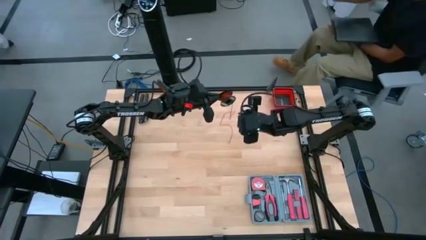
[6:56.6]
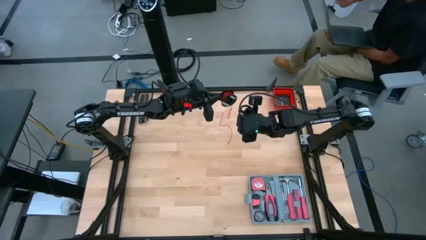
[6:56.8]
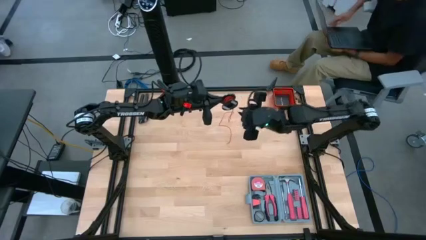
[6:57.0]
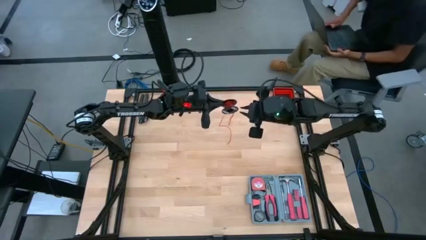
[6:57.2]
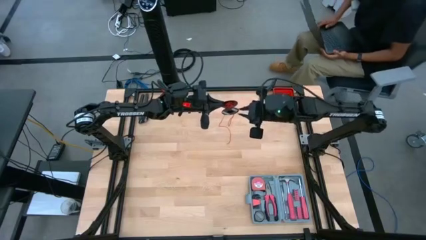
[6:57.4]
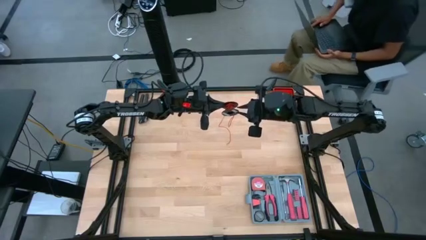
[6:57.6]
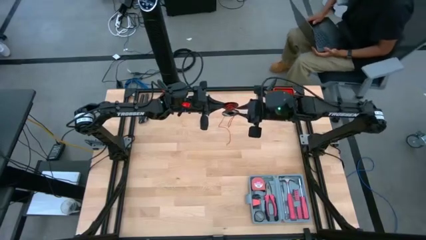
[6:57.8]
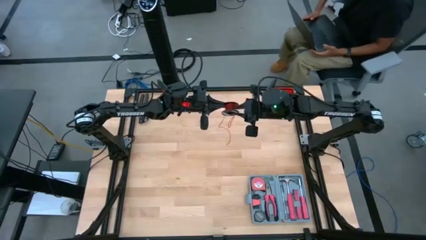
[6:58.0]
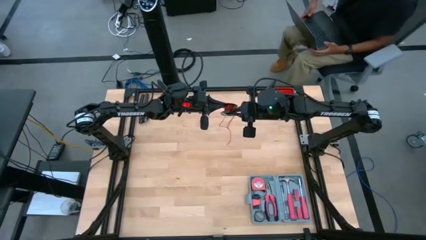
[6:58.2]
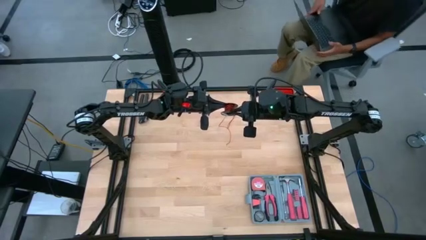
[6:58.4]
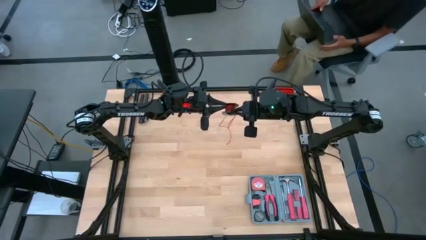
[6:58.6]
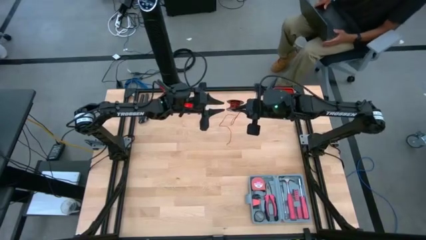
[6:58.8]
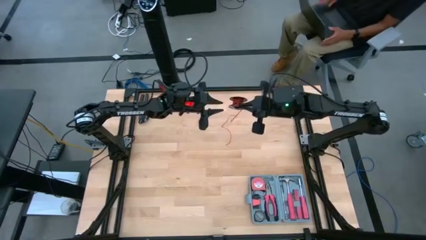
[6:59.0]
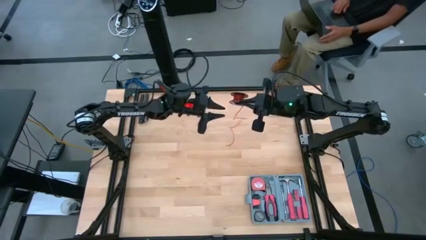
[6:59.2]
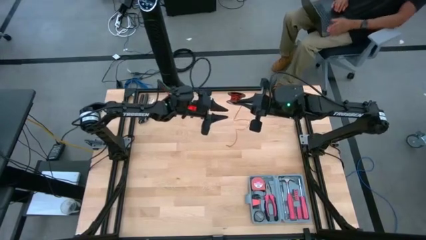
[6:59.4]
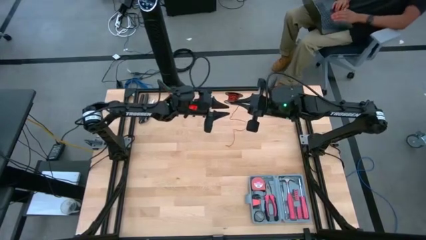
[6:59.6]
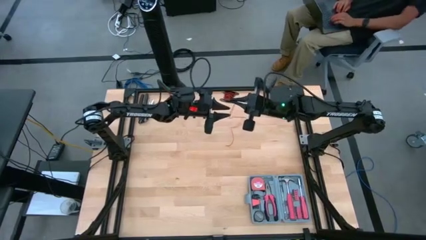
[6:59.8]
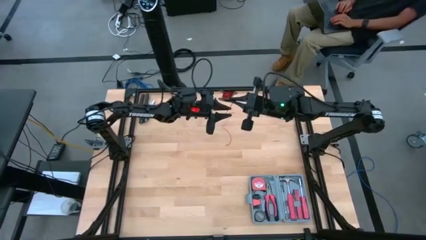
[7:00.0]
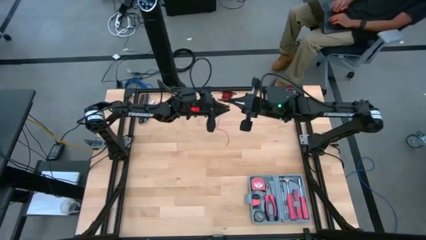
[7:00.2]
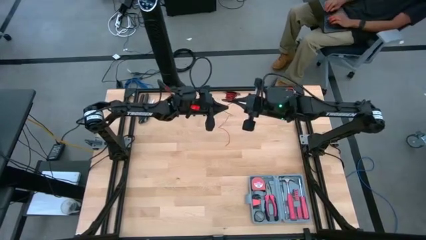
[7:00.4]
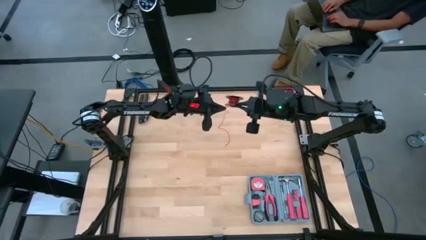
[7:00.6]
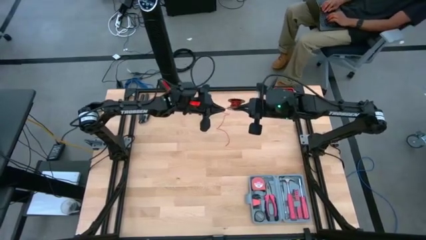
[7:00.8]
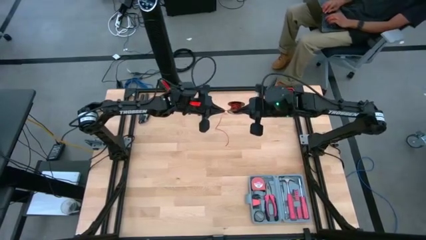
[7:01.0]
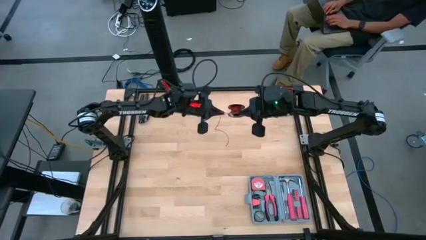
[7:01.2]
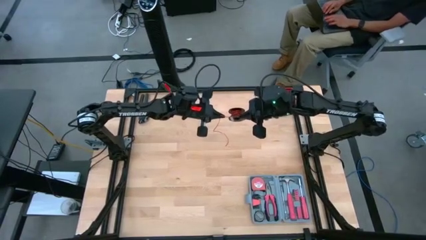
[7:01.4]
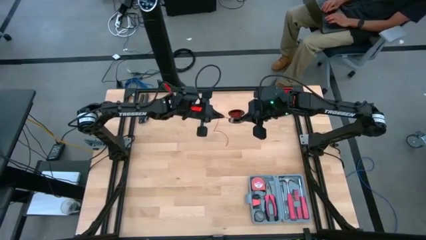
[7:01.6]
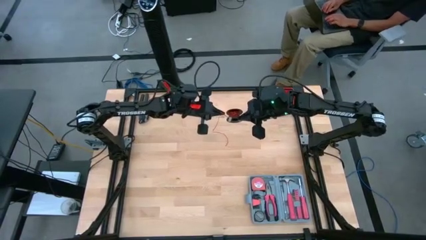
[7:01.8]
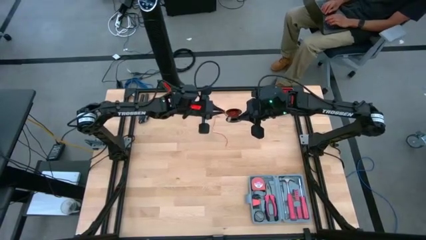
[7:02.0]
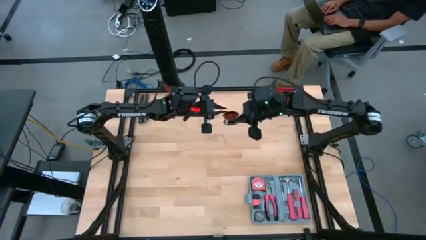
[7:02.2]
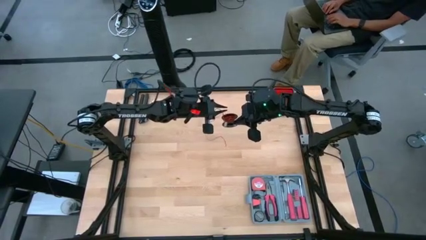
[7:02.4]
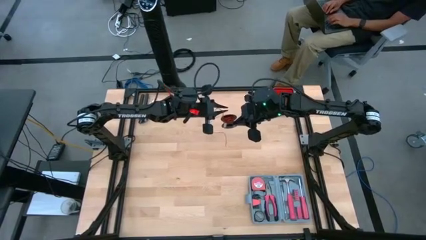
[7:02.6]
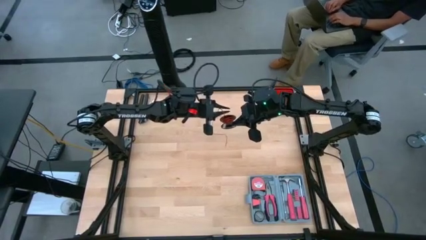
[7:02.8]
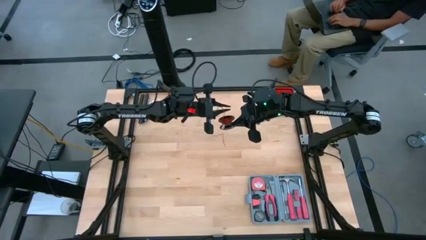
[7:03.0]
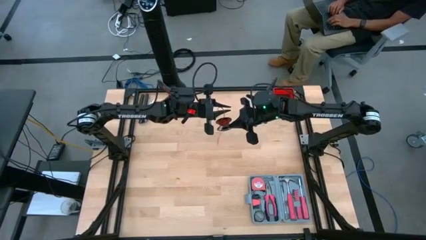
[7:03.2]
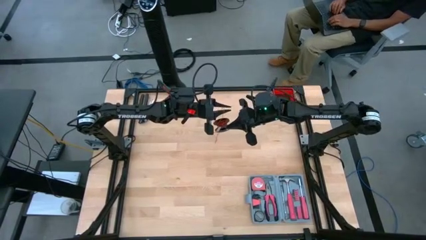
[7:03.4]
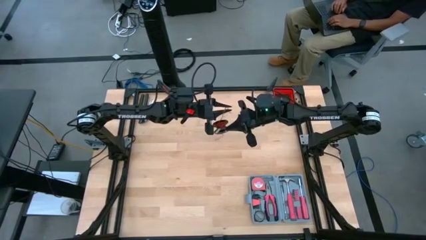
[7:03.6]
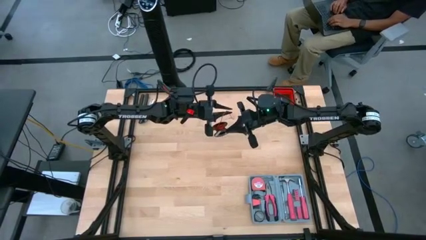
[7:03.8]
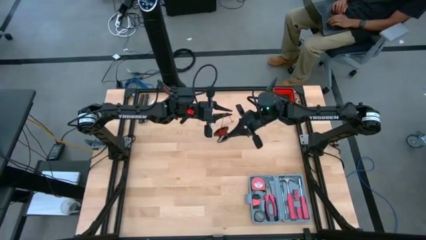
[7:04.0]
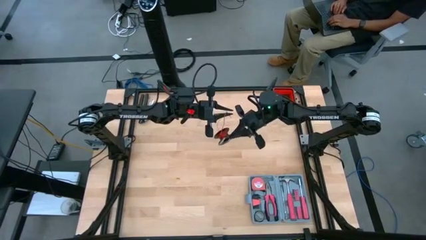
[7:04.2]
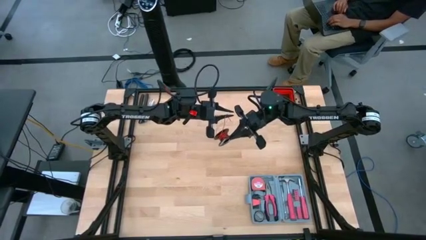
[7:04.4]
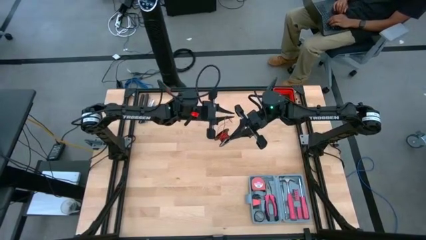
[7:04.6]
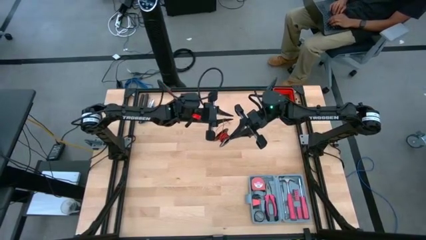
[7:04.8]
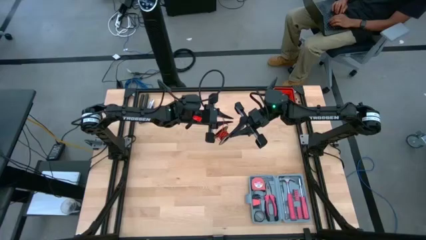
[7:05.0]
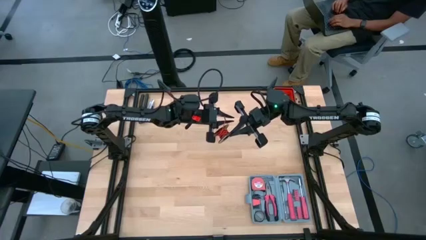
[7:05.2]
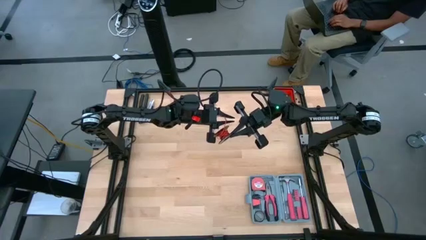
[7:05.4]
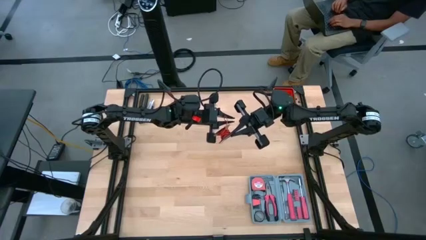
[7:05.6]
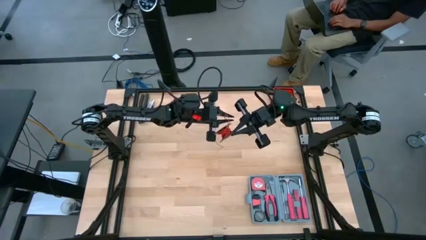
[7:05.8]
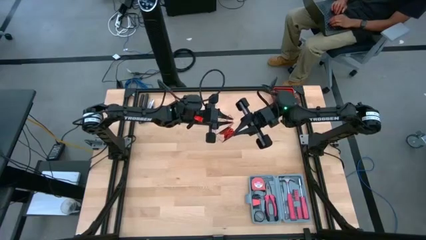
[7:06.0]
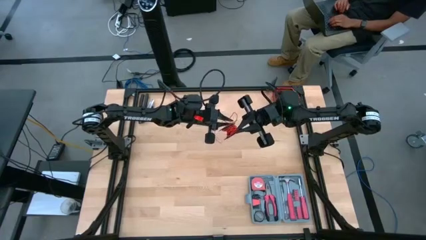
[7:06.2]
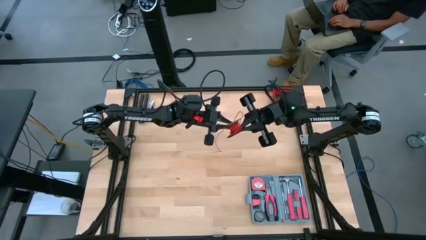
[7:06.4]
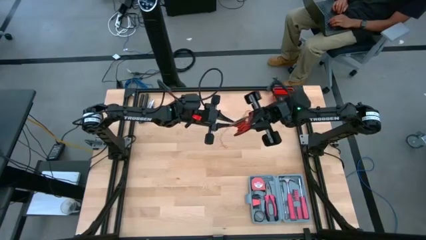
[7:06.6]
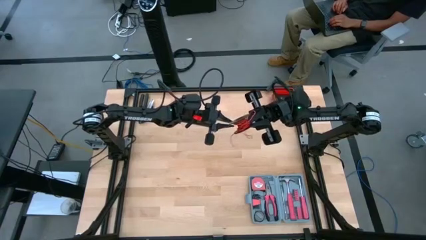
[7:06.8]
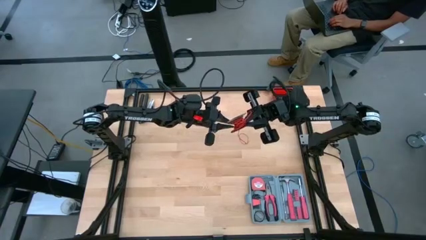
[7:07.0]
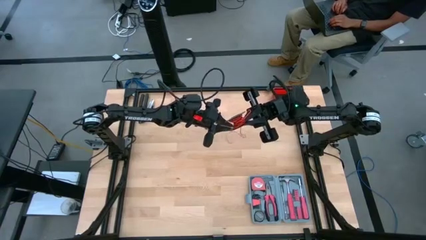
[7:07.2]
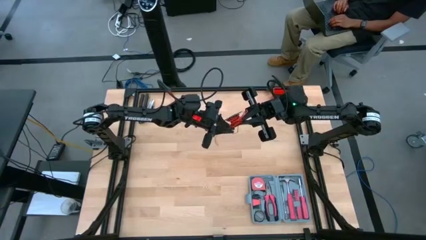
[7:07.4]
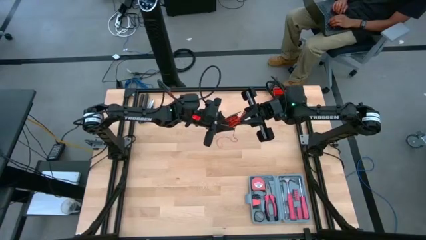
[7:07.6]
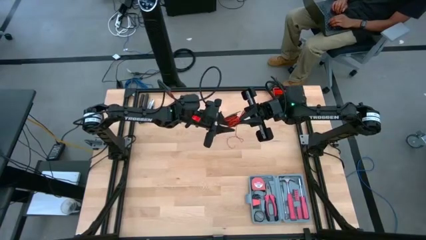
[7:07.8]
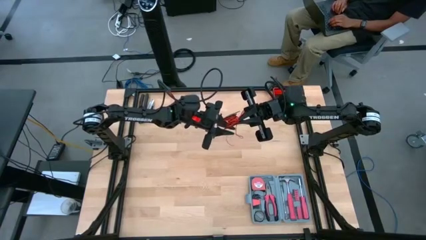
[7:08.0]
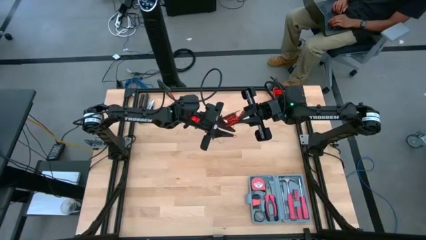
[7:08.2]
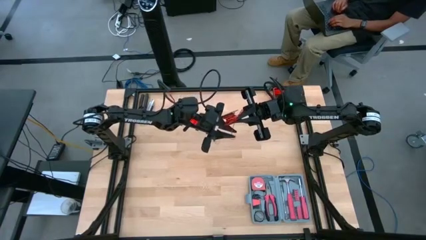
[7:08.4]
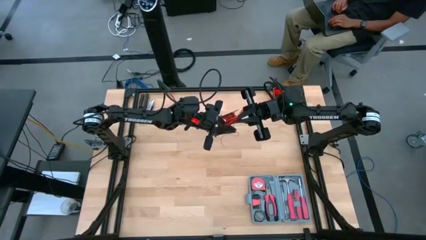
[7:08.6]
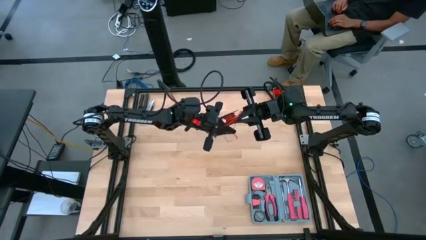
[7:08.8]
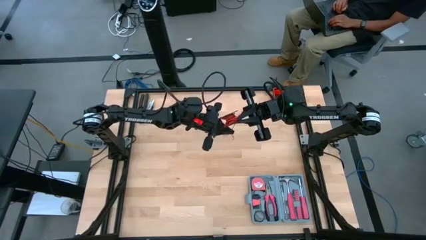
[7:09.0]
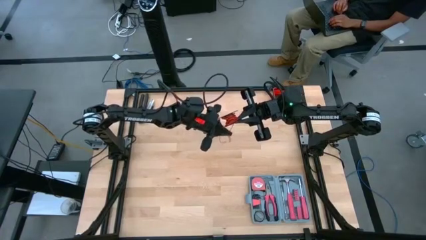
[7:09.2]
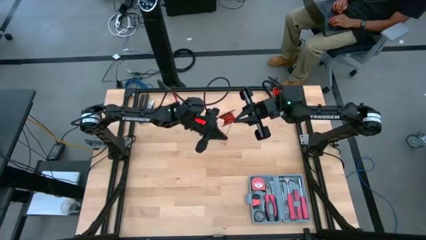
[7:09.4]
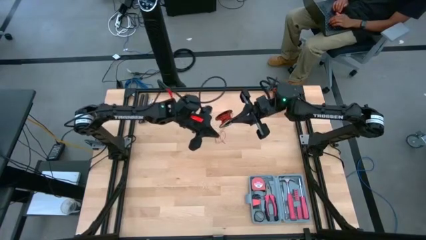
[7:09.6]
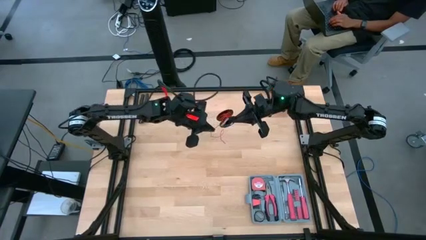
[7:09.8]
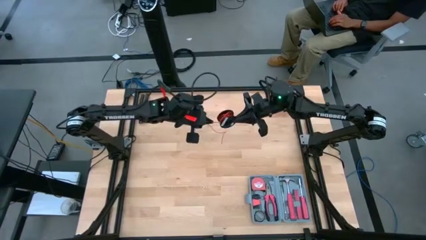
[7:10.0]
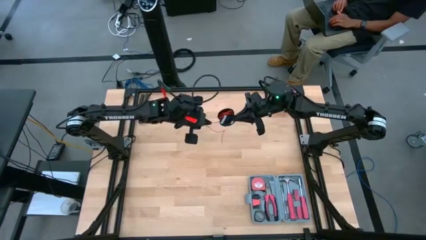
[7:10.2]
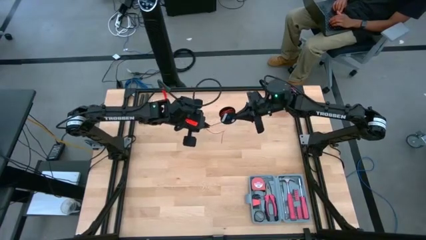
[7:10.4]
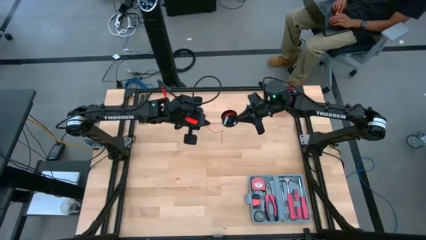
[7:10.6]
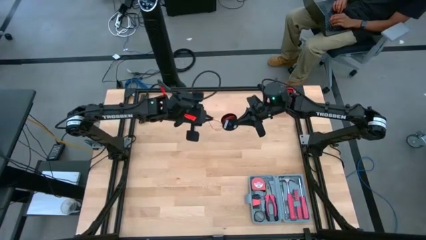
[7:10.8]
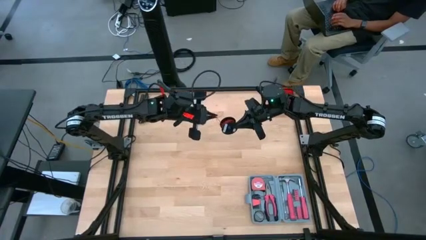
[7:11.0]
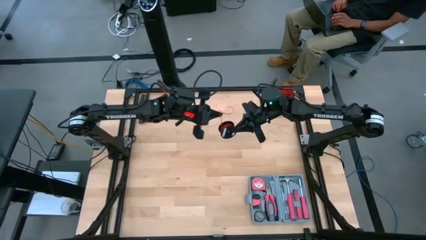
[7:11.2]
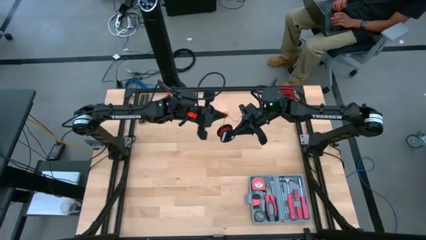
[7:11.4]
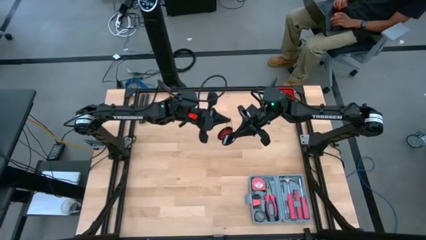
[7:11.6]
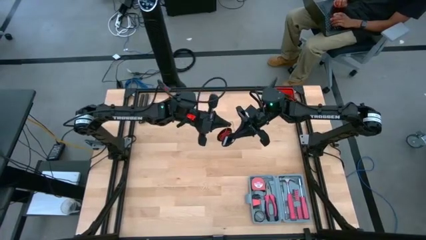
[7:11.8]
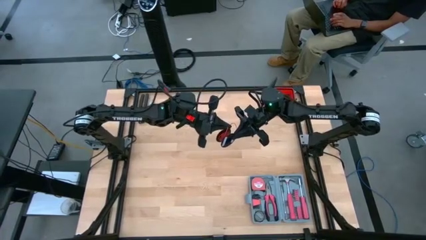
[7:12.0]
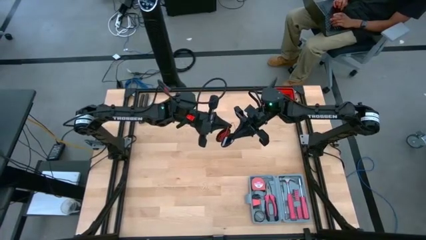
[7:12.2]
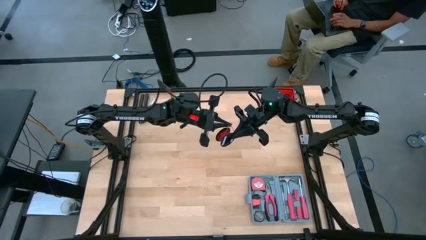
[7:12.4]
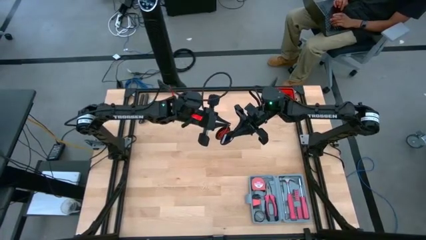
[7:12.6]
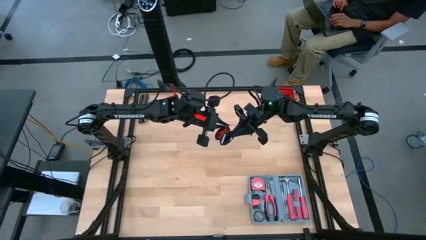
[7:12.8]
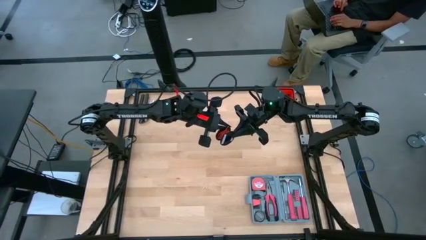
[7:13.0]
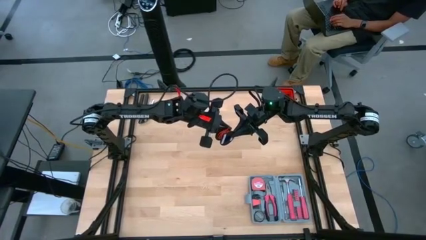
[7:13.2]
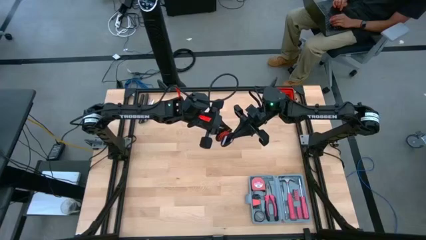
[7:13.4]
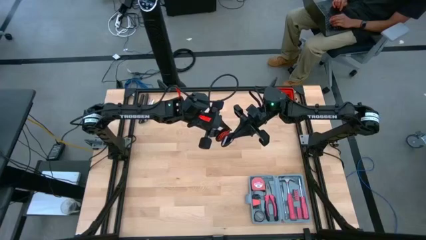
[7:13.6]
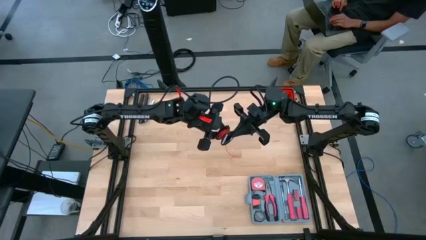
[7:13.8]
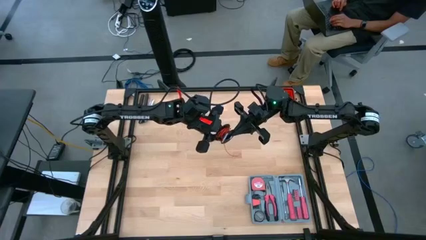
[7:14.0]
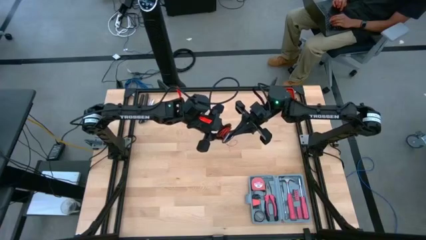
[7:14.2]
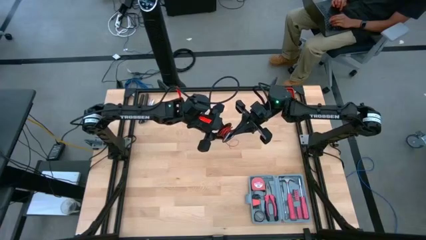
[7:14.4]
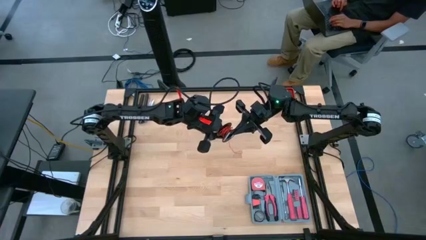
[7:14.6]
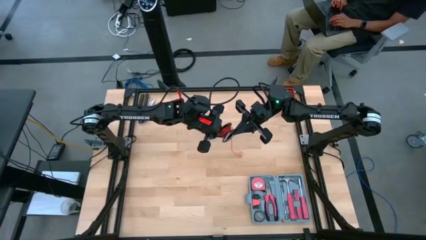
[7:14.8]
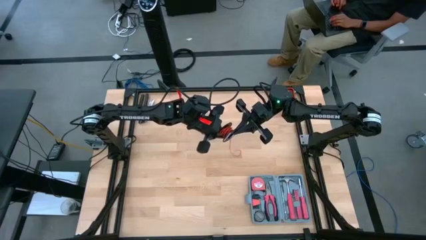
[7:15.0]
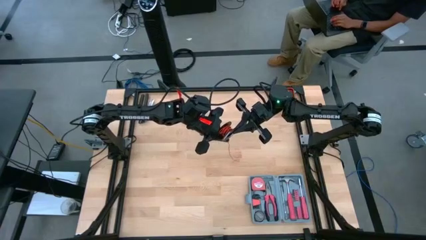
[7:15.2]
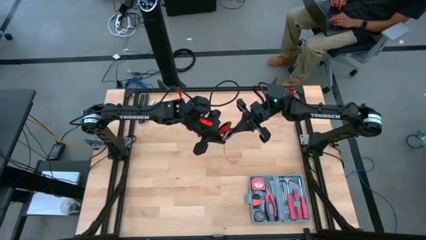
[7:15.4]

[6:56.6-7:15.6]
Task: Coil cords
Coil the wire
